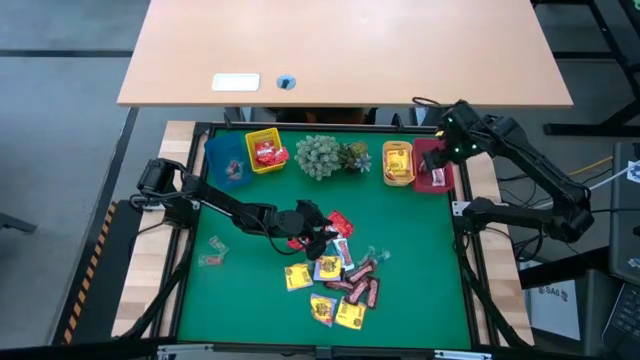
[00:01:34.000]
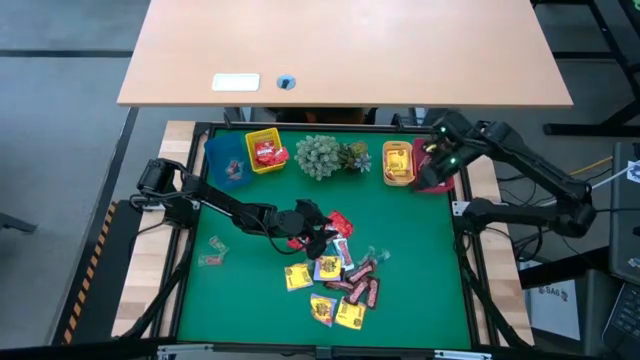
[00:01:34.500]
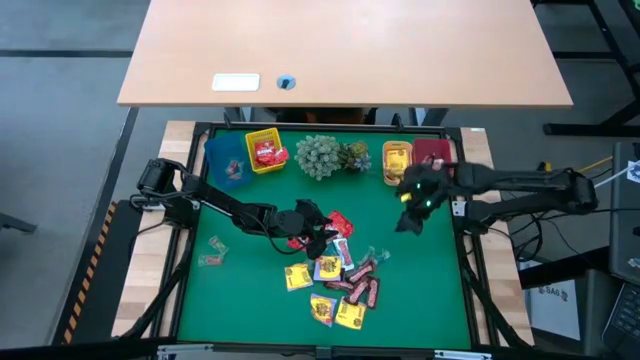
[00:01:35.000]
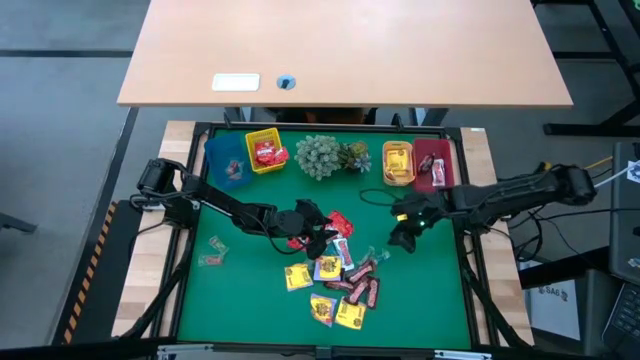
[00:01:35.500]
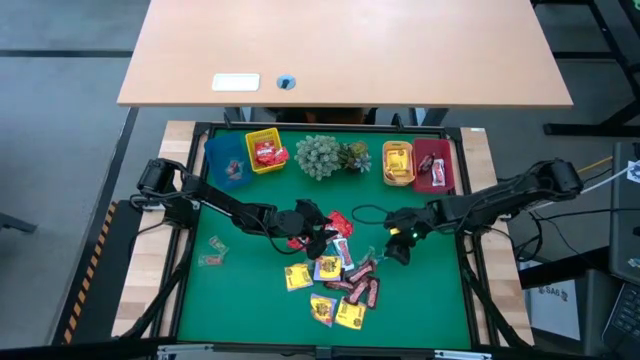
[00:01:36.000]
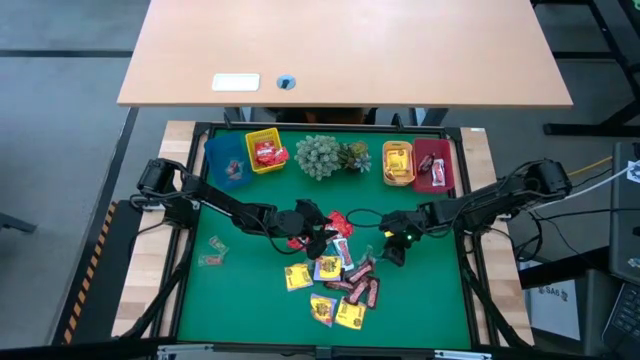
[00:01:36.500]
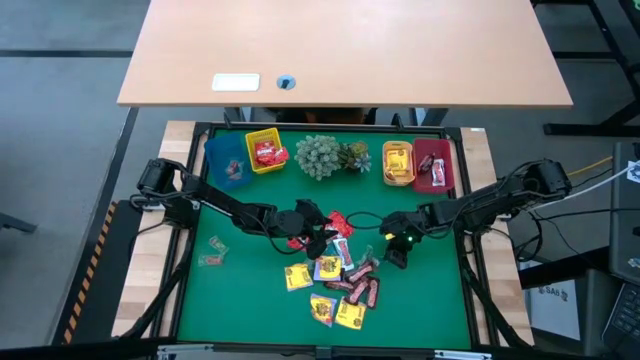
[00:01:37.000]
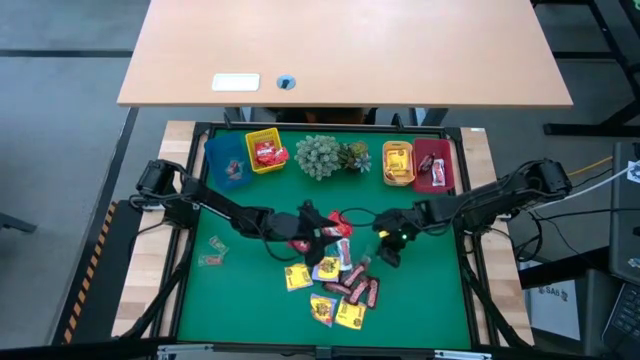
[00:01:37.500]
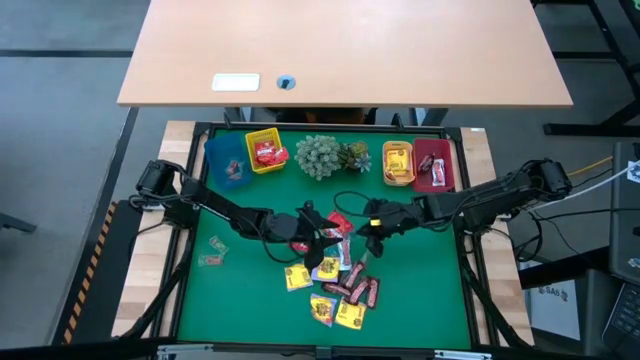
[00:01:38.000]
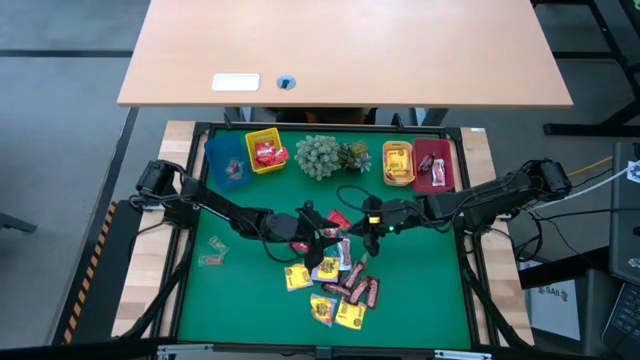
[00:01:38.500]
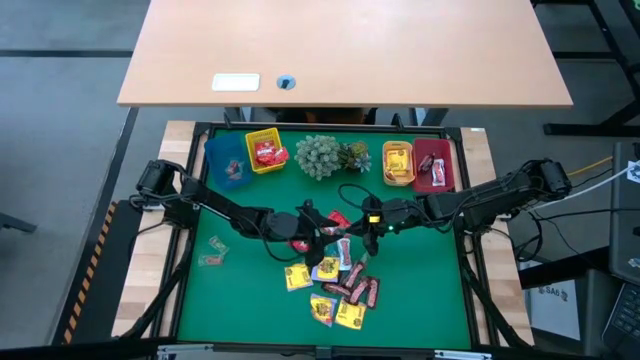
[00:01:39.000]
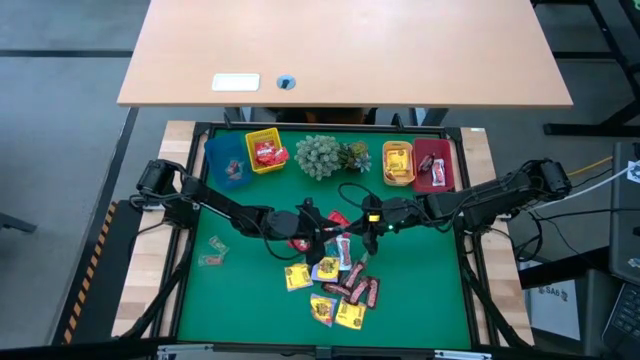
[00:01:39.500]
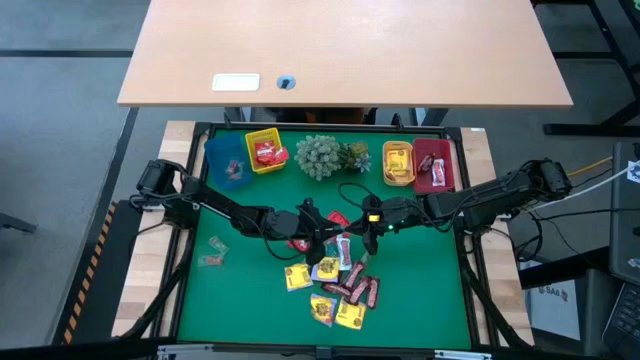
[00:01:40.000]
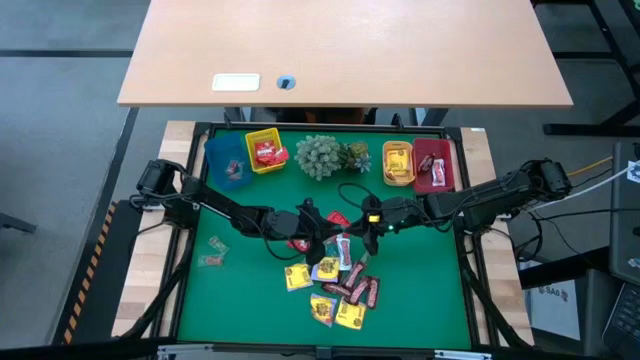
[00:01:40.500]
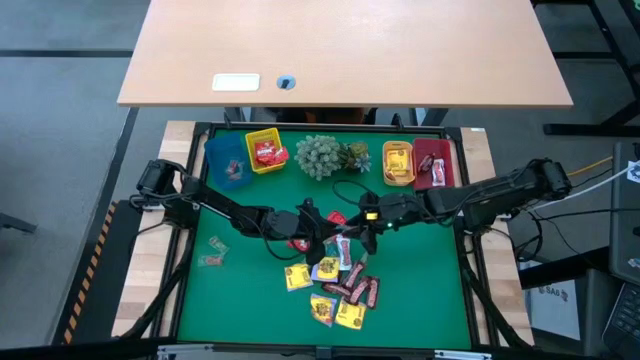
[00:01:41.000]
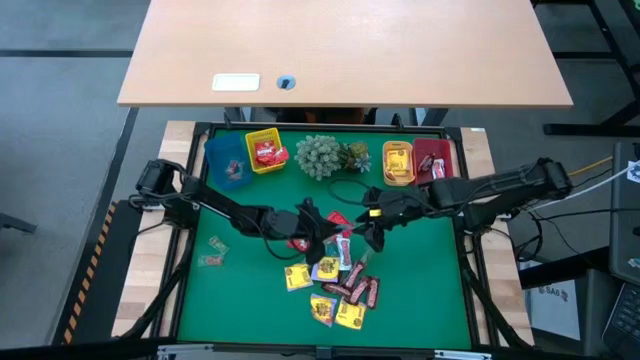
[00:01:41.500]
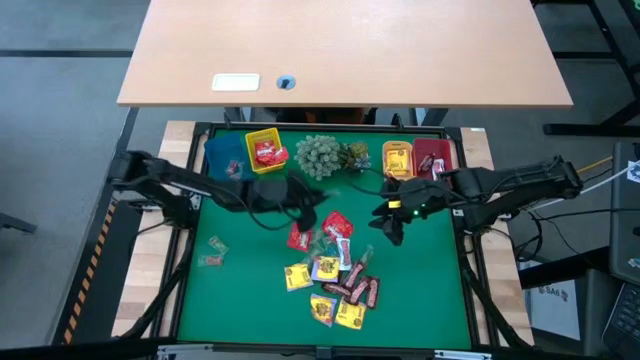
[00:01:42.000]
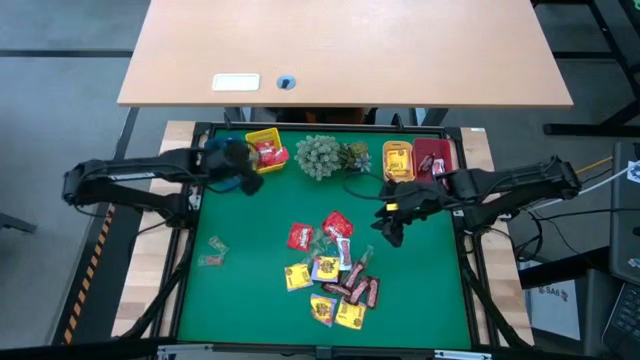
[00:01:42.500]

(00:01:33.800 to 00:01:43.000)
Task: Sort candy
Put the blue gummy into the blue bin

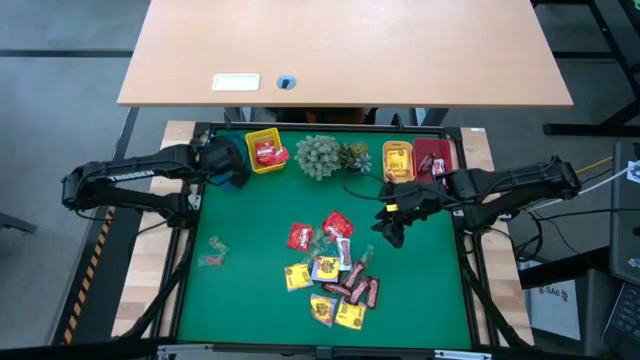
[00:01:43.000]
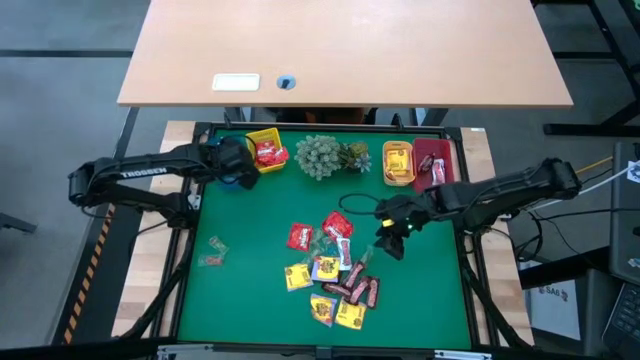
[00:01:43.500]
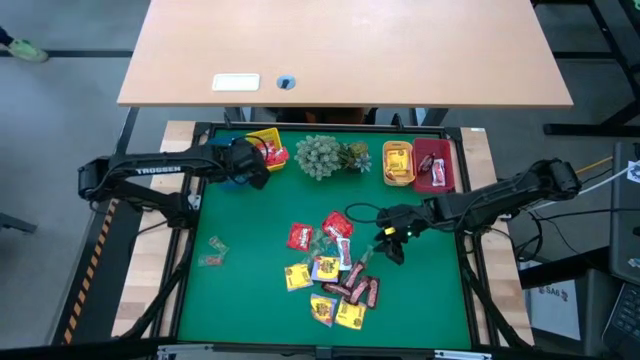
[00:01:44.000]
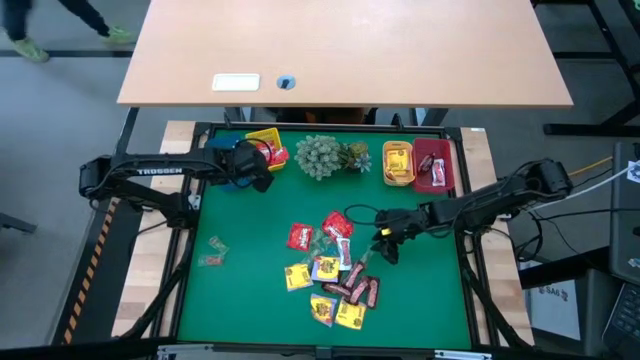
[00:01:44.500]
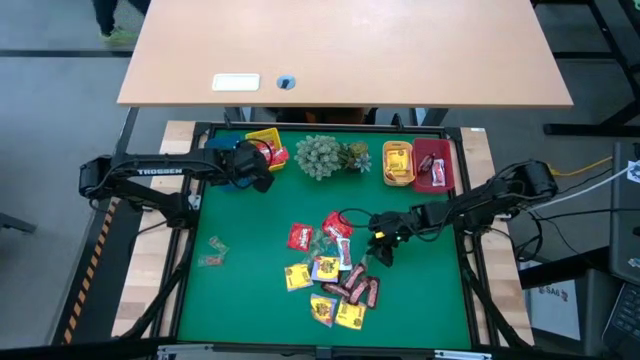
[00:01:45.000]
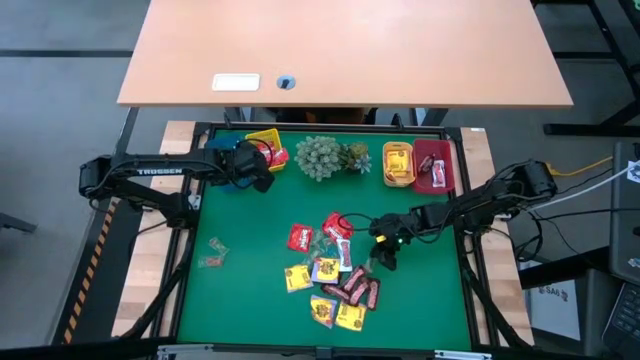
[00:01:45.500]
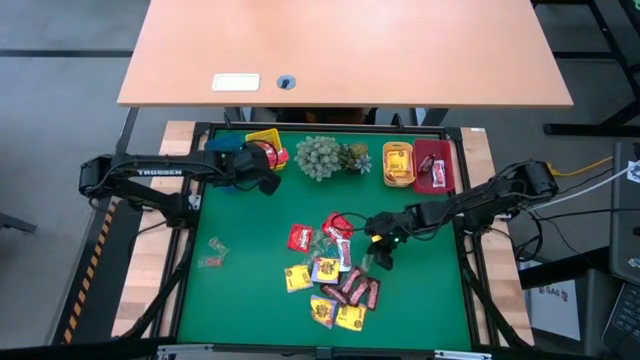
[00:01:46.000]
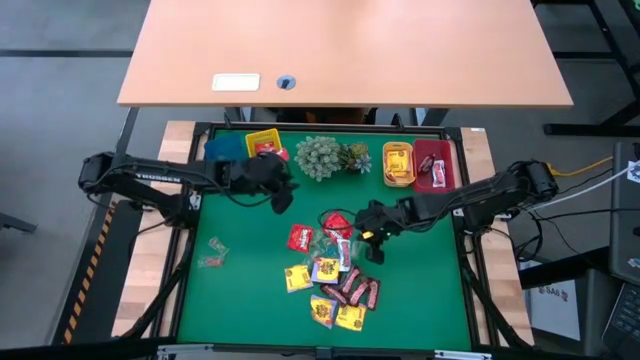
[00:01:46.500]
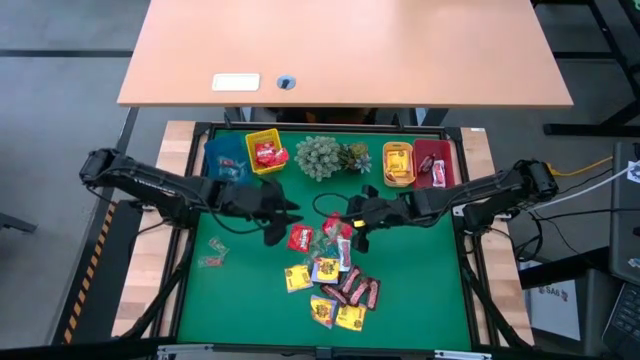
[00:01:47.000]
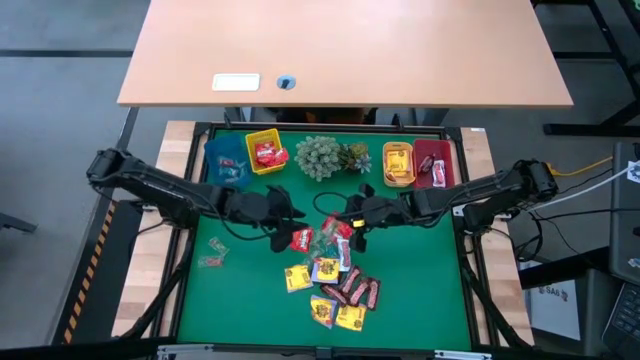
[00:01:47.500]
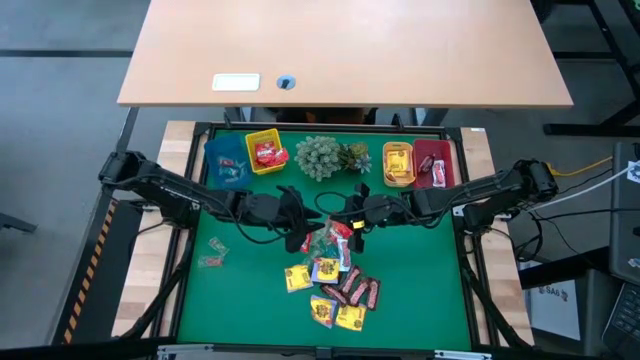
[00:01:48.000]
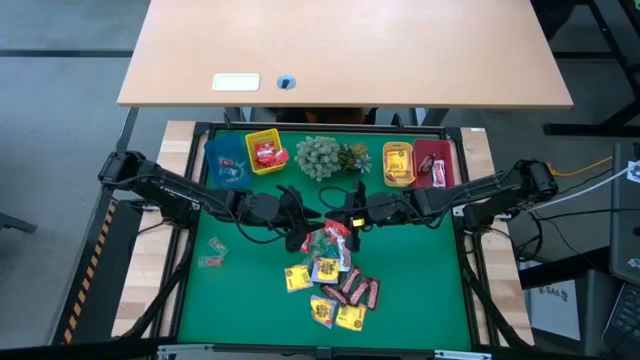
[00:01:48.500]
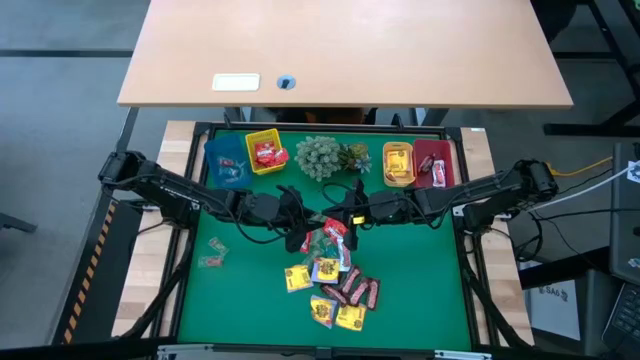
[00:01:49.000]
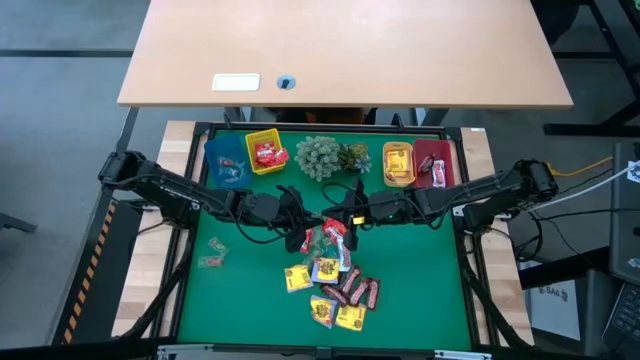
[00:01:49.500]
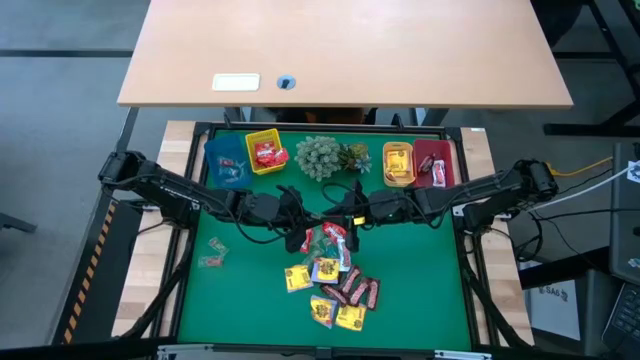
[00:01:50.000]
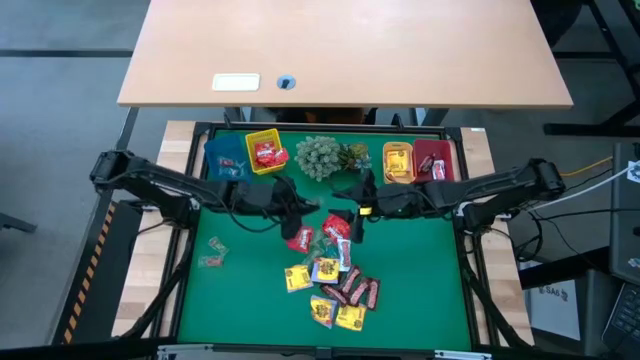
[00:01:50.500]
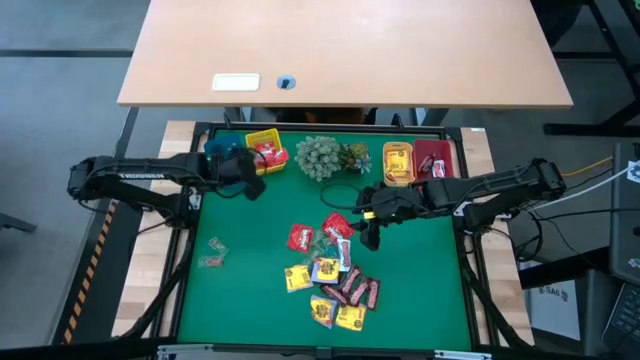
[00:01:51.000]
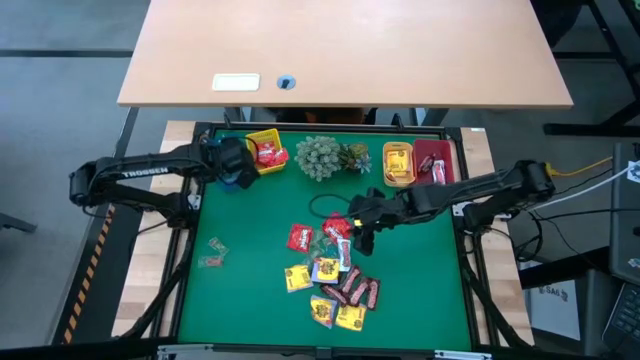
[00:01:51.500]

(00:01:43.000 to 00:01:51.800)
Put the green gummy into the blue bin

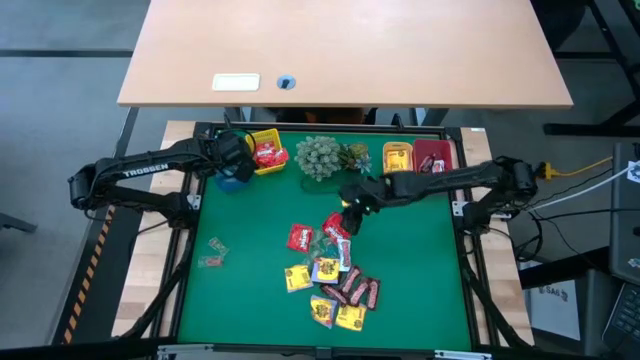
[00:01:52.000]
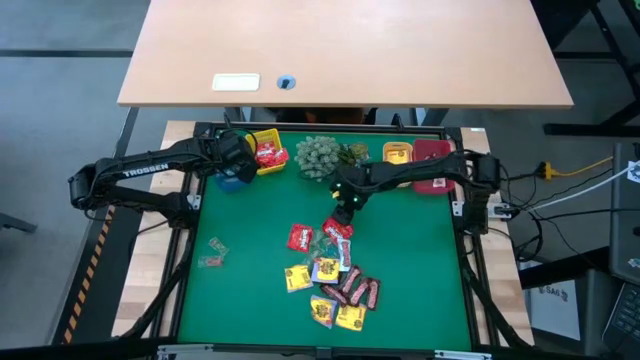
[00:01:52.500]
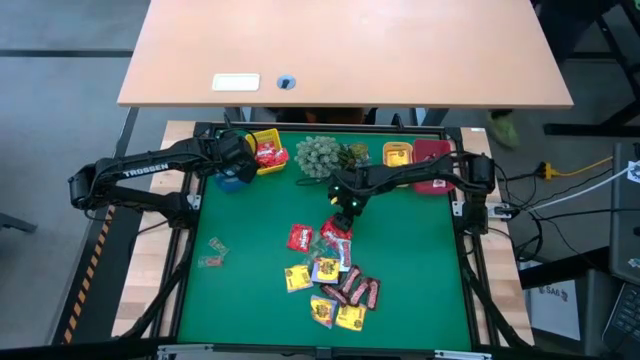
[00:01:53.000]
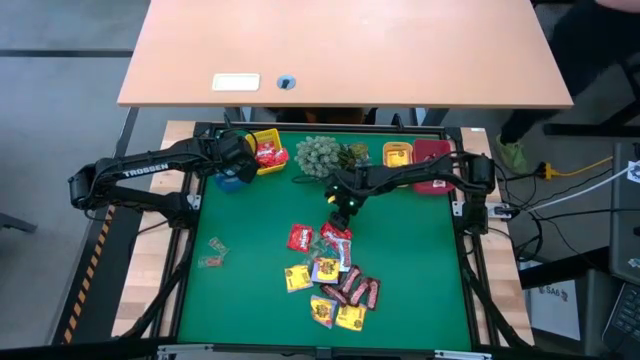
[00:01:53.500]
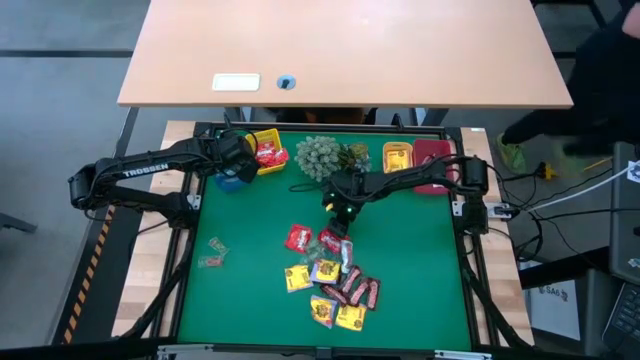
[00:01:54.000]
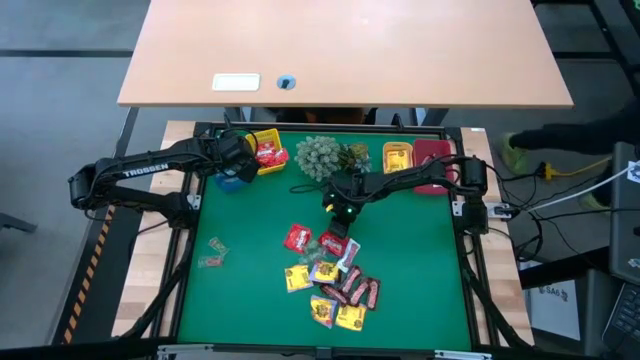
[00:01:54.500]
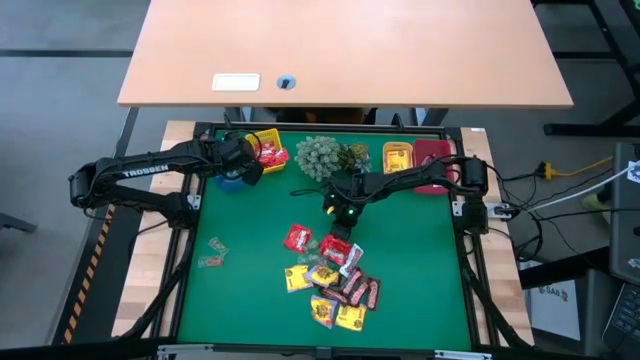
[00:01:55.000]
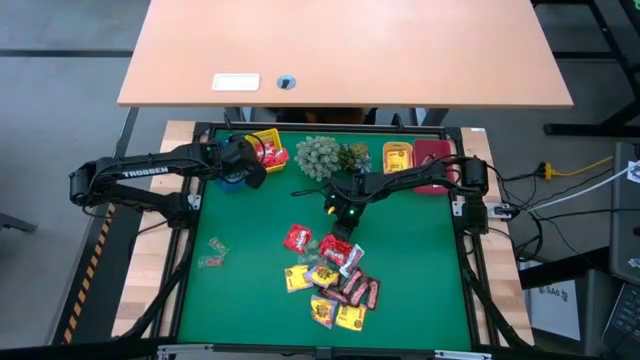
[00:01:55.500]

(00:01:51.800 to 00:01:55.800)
Put the red candy into the yellow bin
